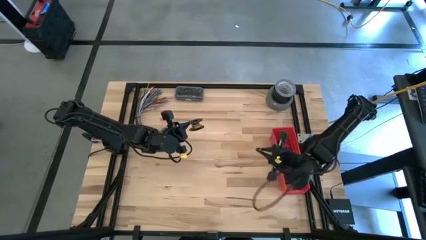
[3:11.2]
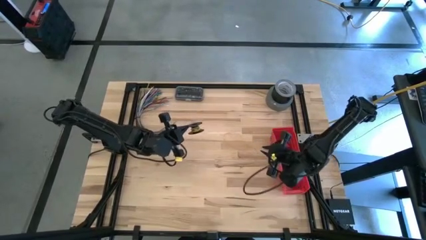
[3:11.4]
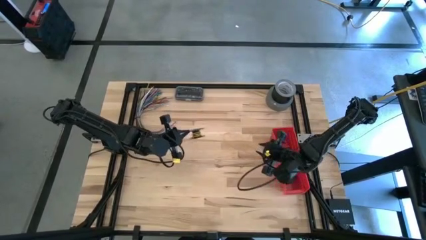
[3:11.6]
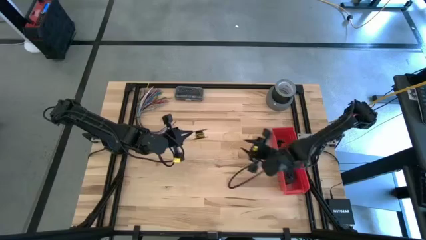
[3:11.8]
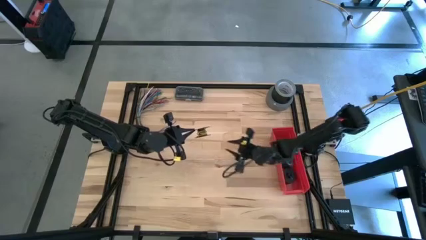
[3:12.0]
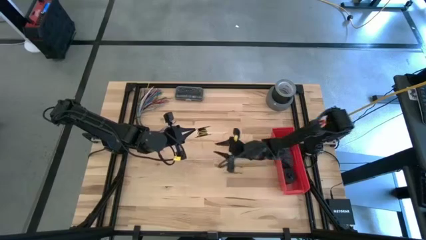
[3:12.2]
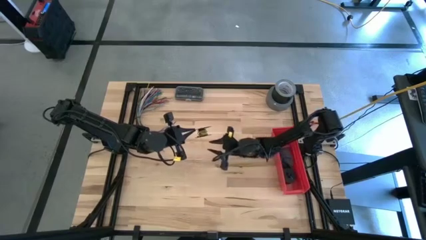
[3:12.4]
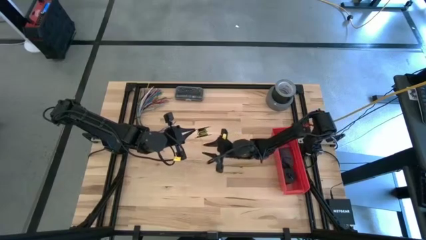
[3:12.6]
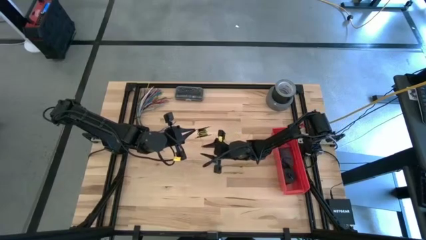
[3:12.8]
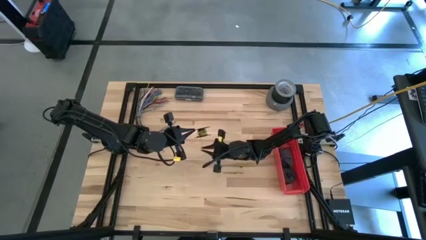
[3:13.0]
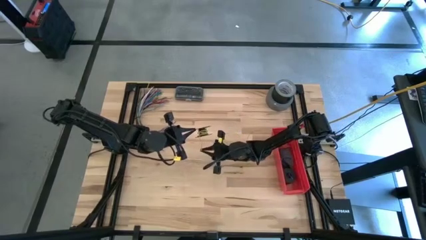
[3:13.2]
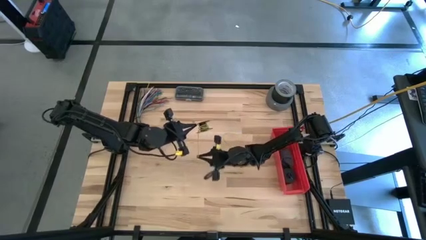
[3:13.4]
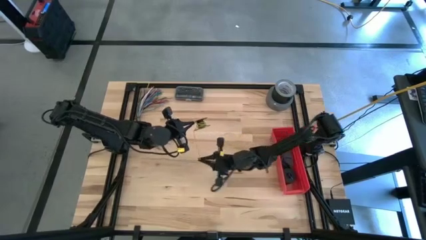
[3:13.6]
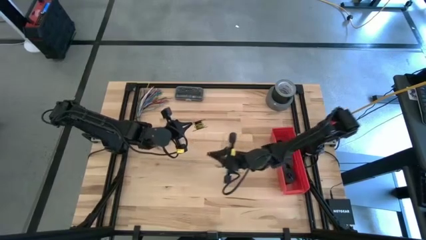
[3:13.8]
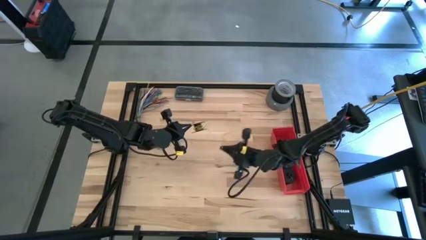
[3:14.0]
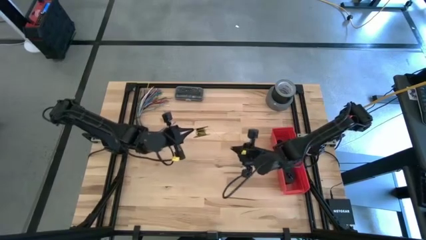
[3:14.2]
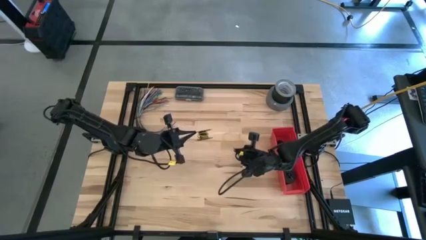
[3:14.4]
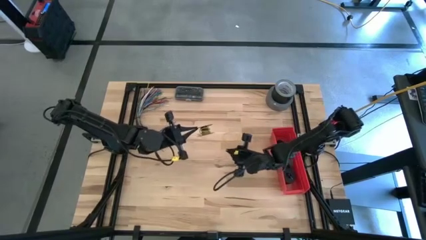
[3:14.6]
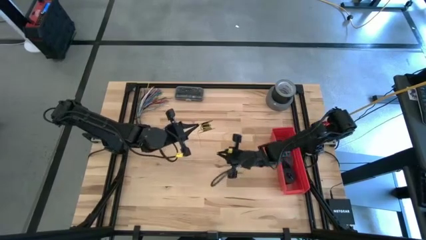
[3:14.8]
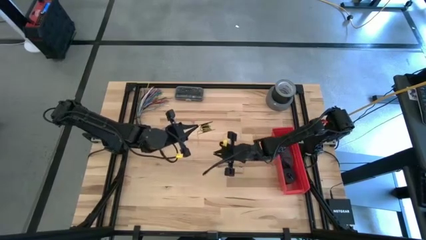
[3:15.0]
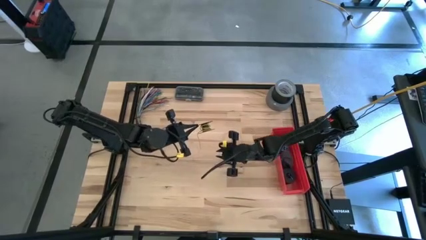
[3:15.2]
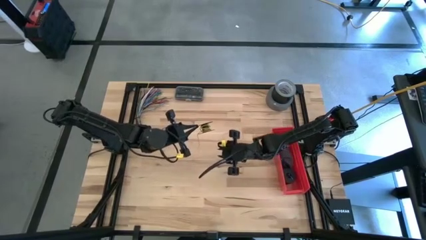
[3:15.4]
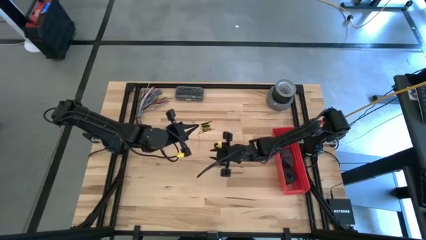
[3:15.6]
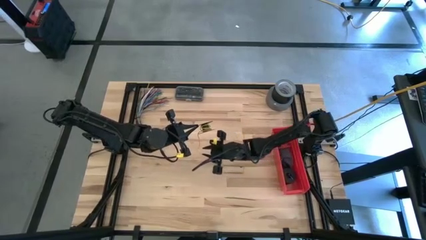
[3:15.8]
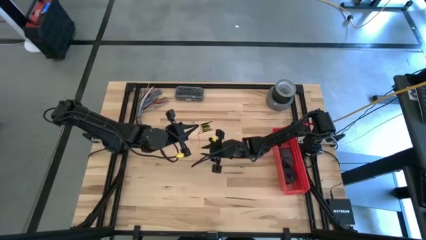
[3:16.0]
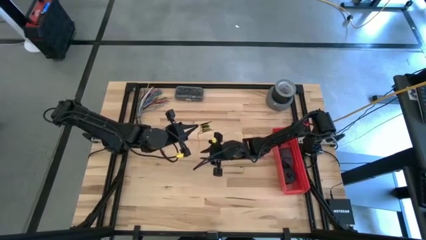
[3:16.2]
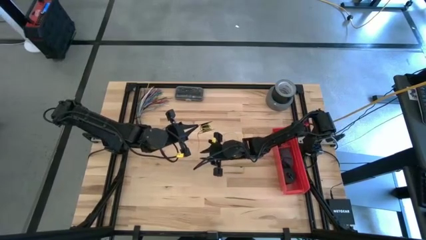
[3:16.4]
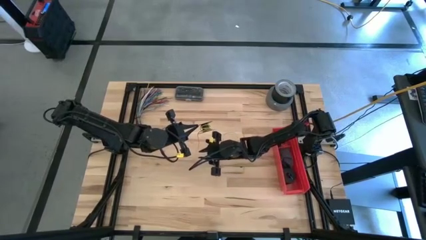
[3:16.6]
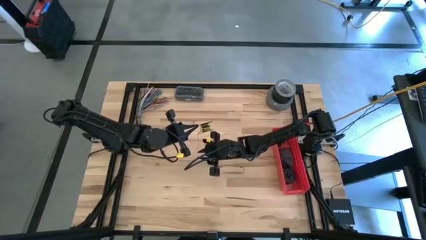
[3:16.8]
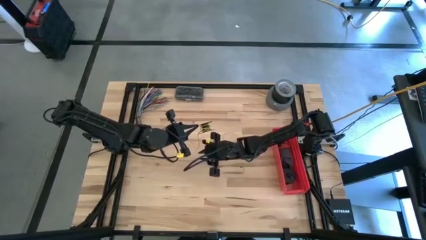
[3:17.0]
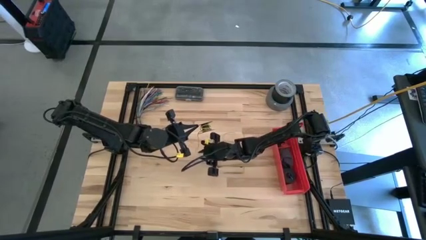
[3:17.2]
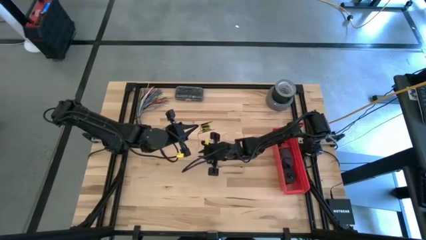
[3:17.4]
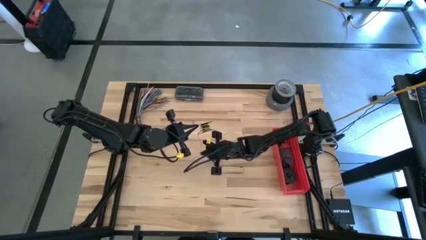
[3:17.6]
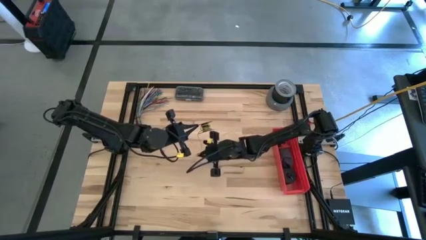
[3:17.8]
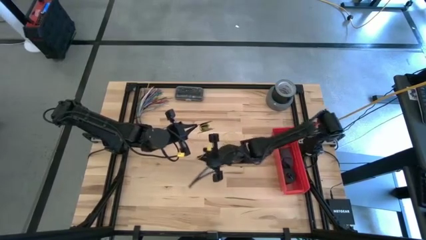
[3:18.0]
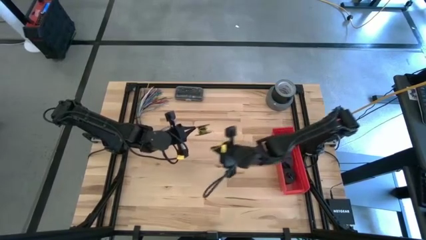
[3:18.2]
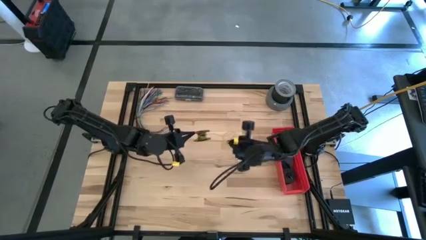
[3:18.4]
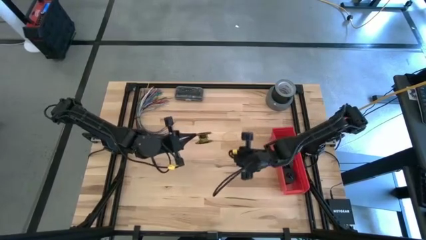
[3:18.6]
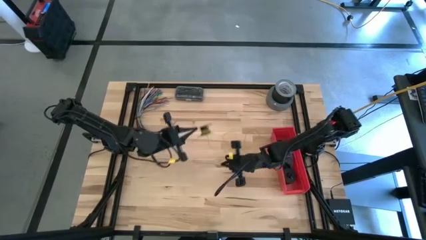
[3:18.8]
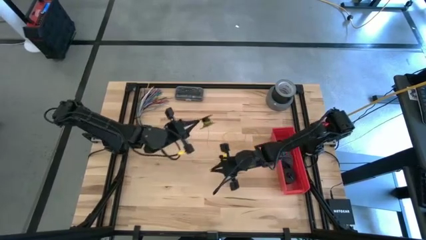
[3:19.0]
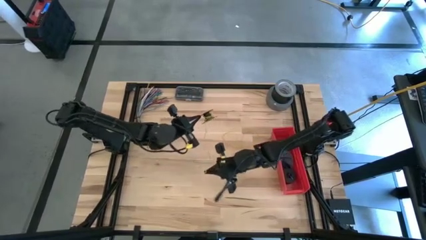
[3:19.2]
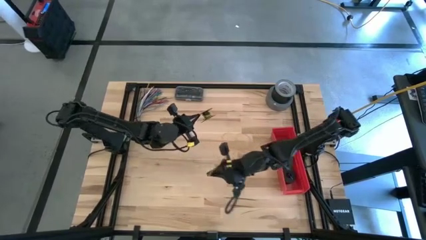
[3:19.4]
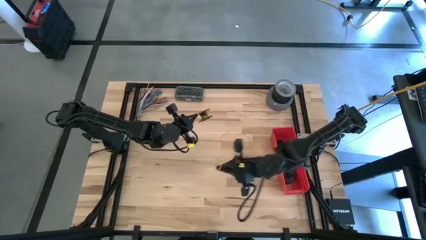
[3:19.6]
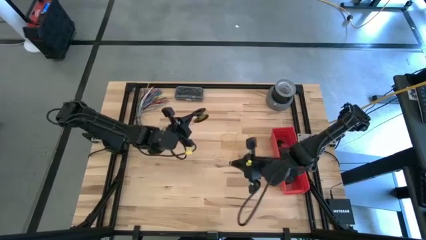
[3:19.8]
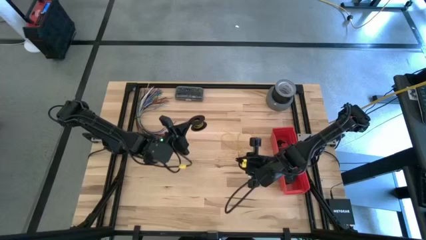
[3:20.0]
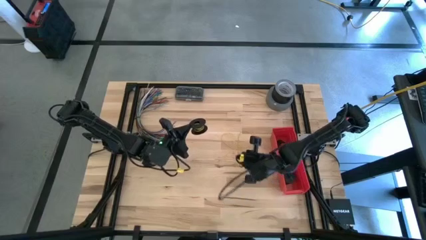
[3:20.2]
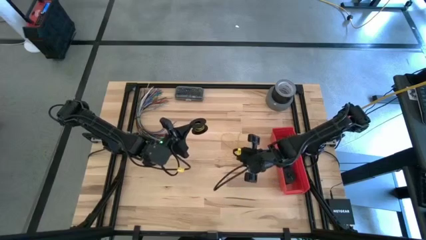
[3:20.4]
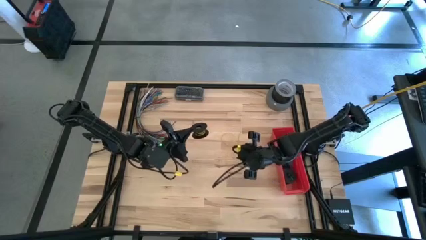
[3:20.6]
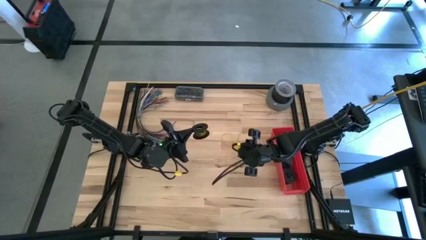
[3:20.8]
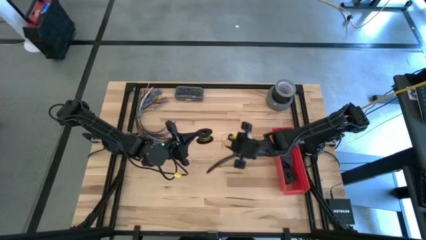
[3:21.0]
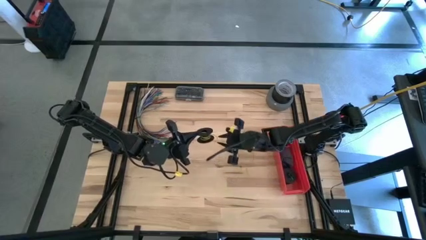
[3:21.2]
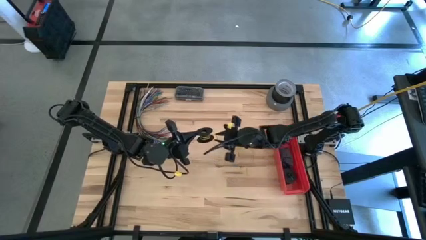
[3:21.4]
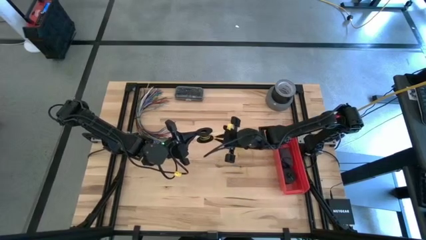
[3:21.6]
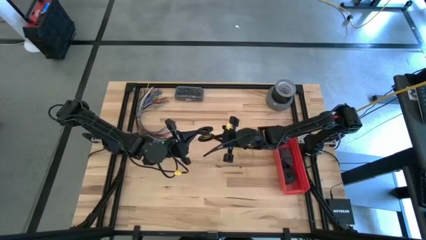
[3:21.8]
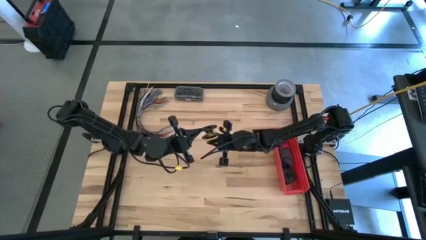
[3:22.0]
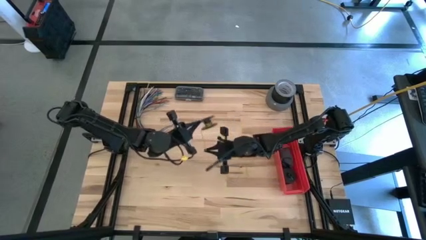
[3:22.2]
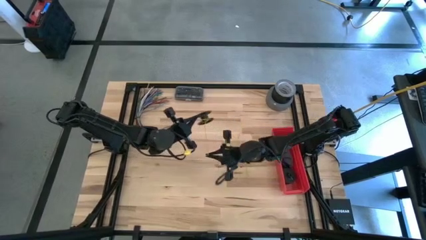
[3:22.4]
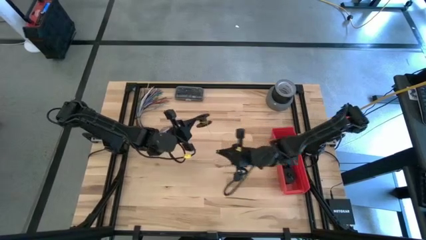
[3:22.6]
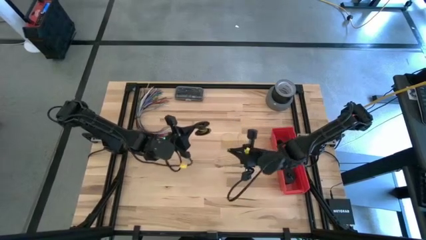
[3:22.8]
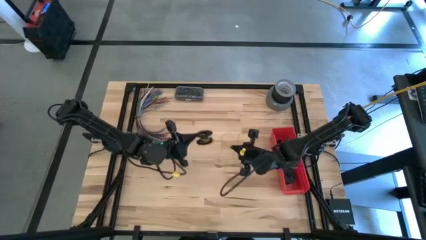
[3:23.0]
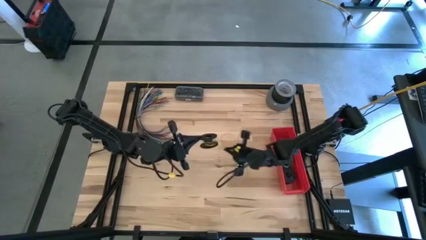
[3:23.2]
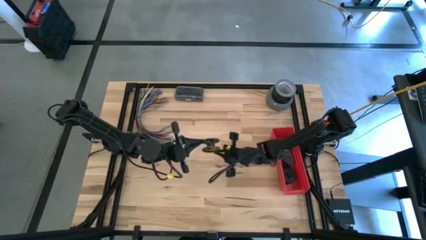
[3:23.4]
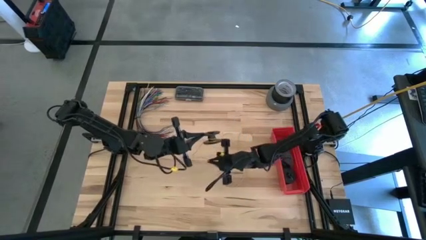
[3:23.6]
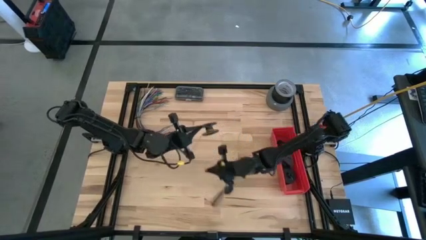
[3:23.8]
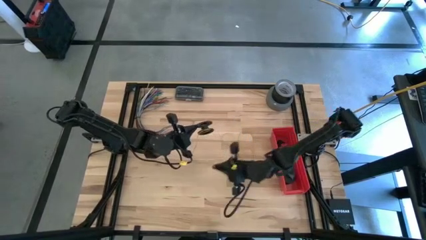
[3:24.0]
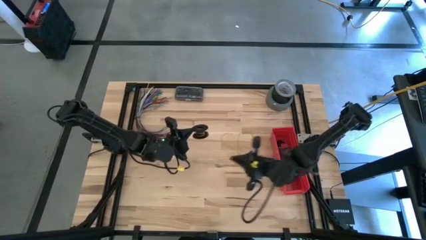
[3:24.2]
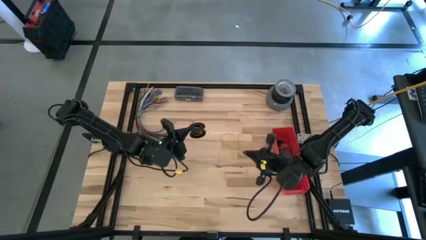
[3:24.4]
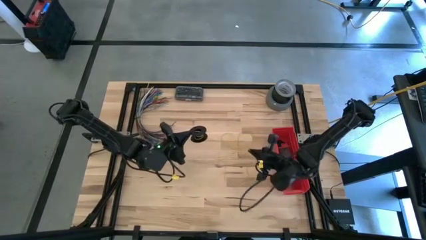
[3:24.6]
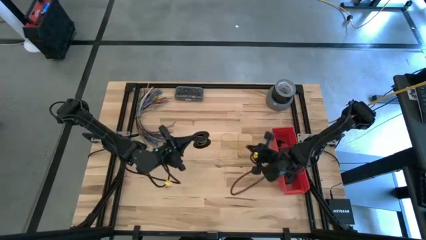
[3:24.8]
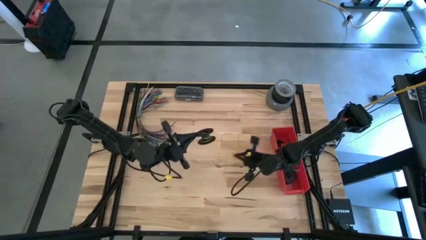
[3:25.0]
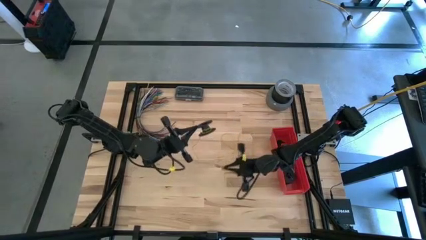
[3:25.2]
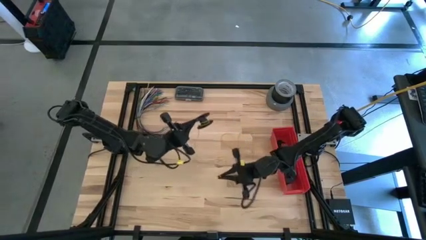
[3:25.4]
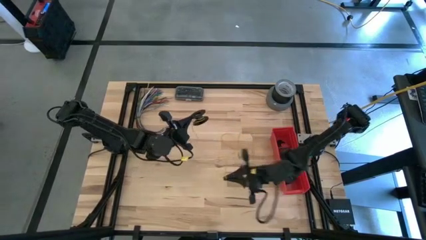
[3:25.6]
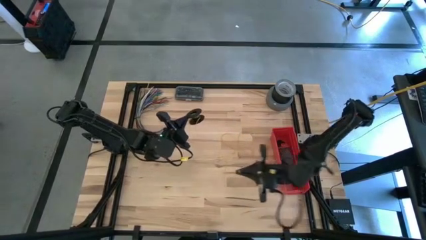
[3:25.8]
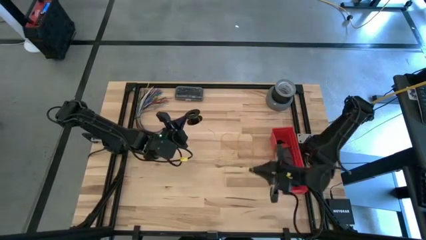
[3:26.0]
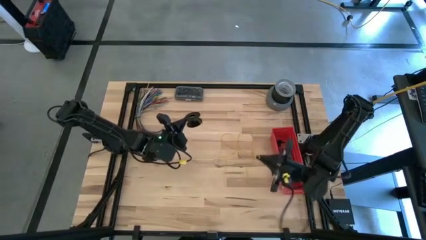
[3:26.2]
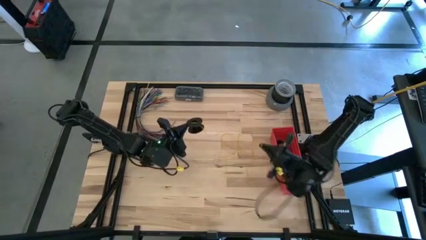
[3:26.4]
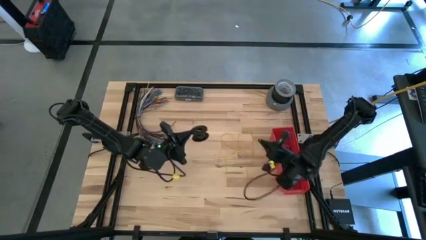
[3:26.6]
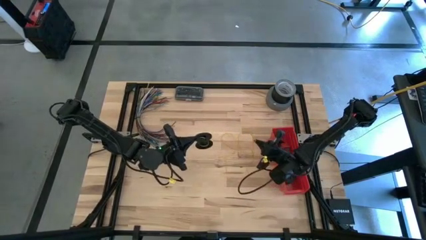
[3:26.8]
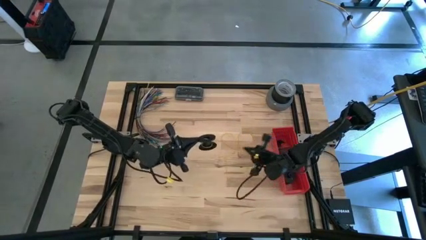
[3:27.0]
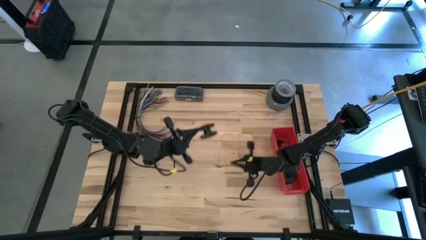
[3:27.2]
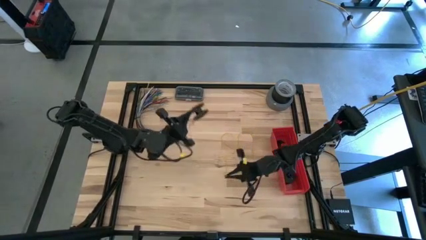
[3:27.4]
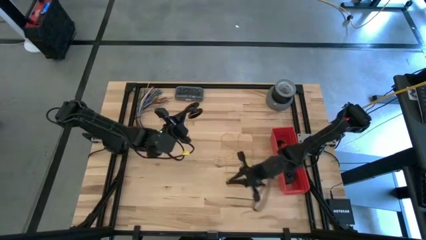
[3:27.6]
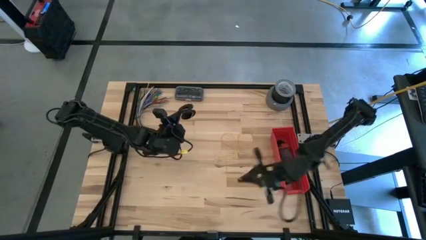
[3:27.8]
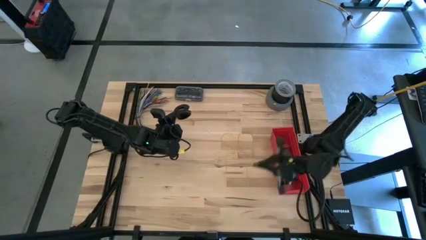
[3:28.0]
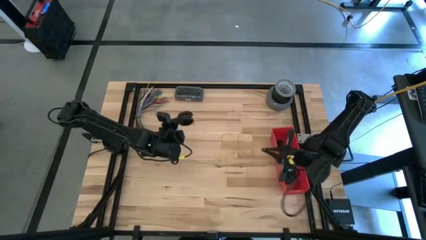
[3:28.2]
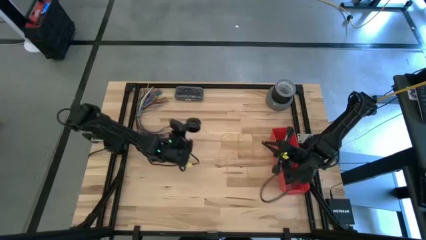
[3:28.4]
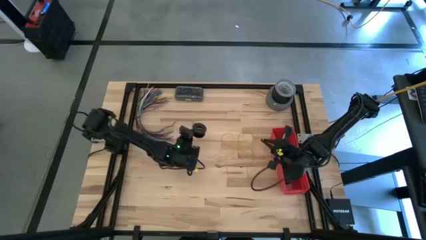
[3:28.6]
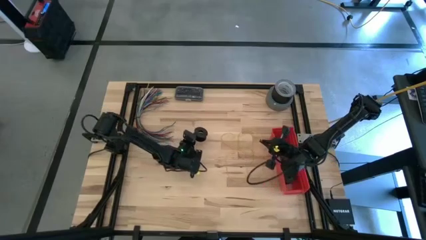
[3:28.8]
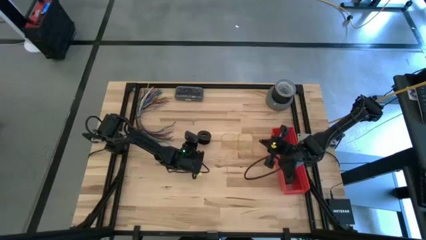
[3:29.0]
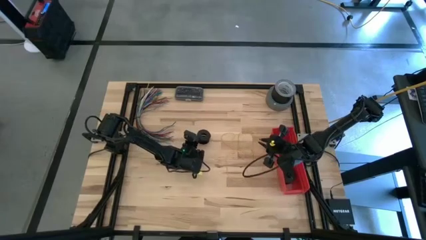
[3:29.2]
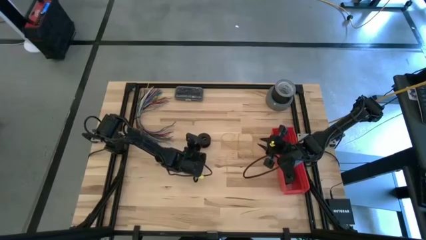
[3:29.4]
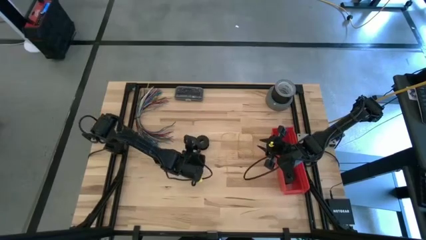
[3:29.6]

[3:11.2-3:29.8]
Task: Coil cords
Uncoil the yellow wire from the black spool
